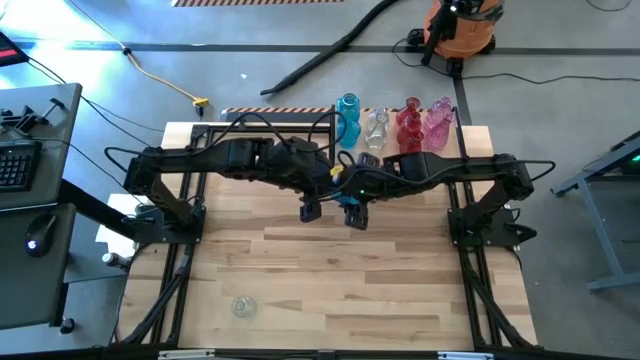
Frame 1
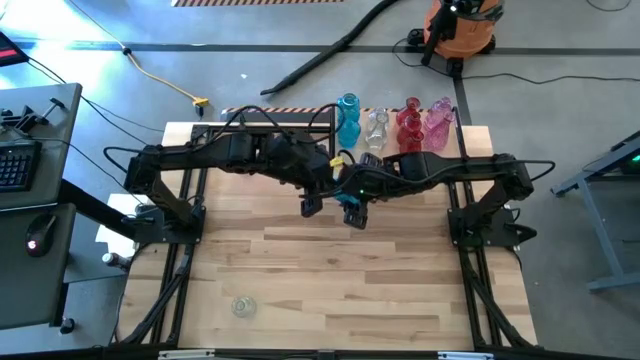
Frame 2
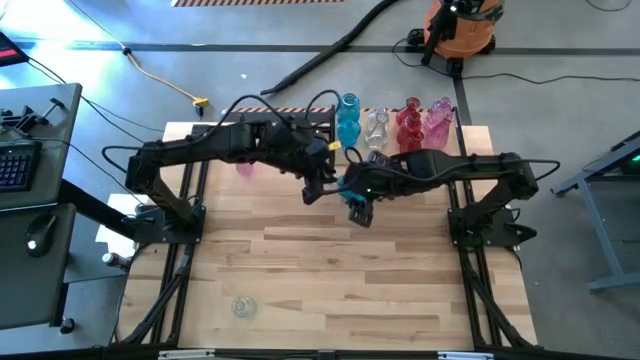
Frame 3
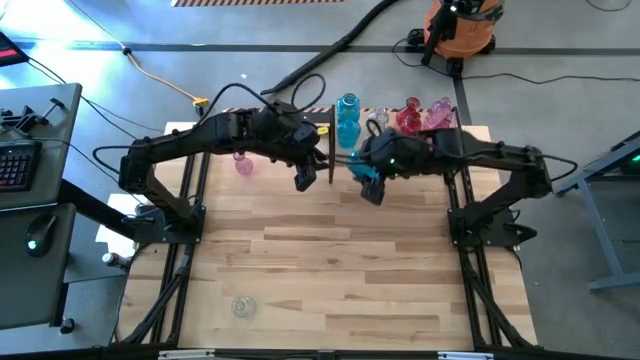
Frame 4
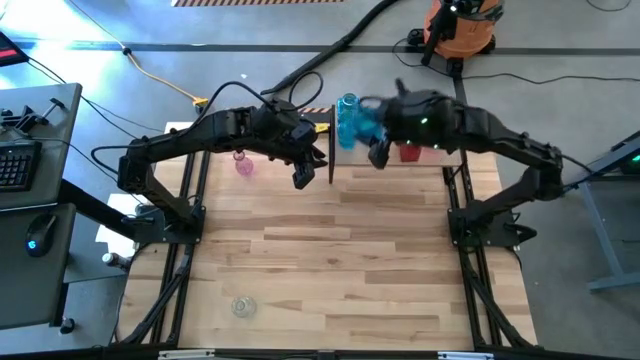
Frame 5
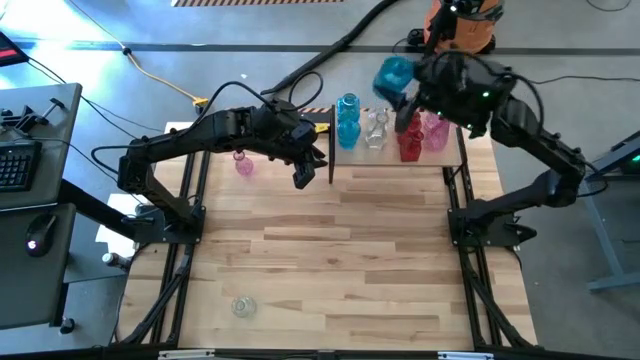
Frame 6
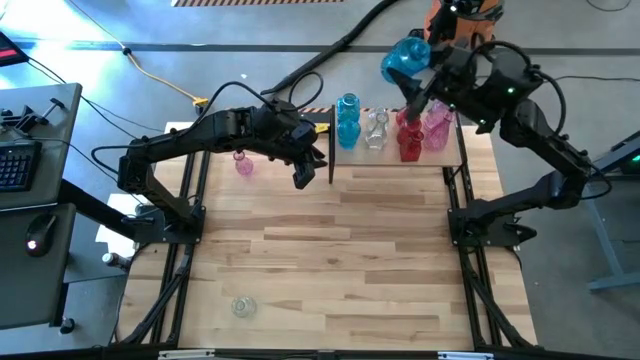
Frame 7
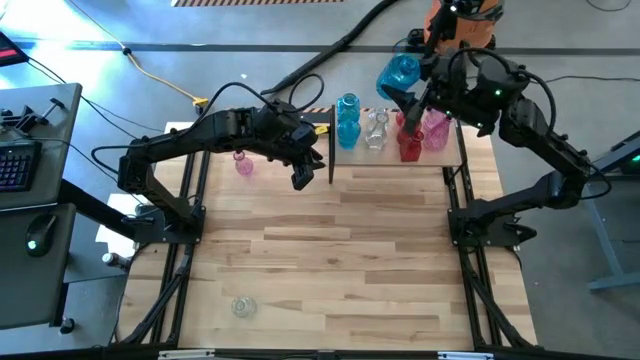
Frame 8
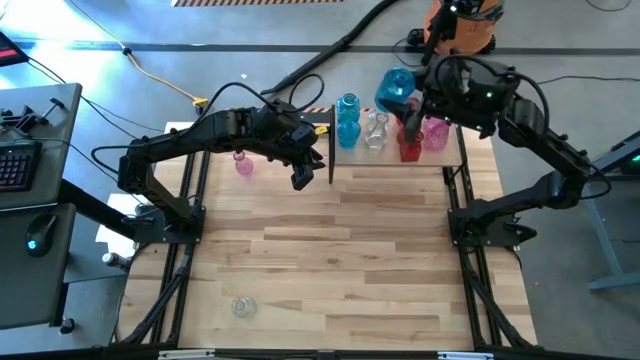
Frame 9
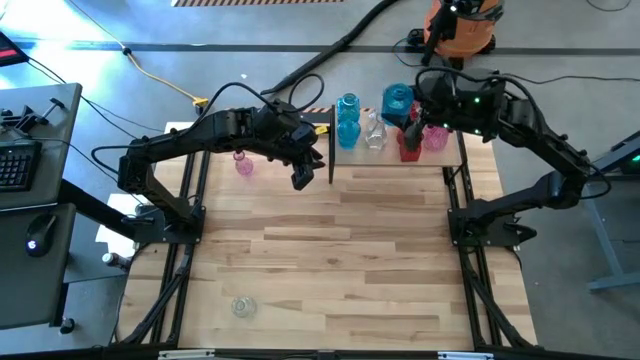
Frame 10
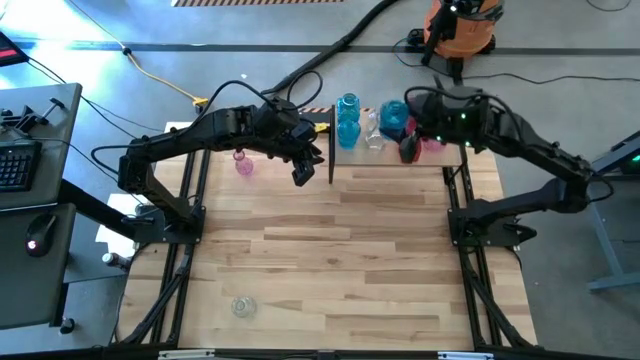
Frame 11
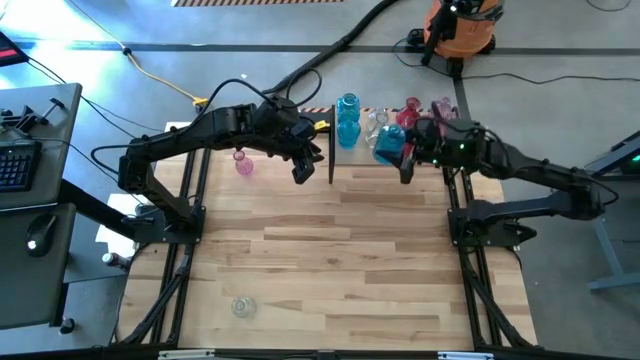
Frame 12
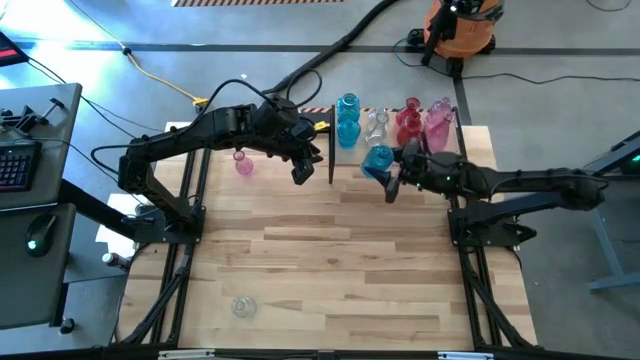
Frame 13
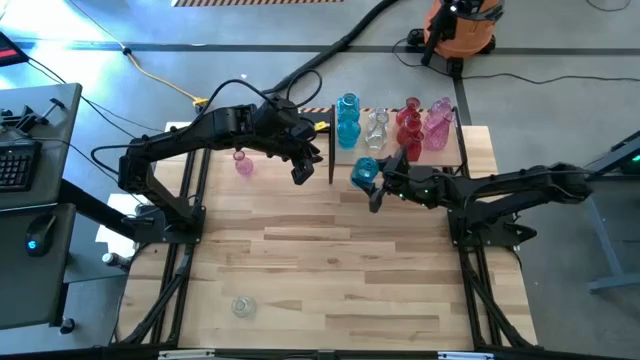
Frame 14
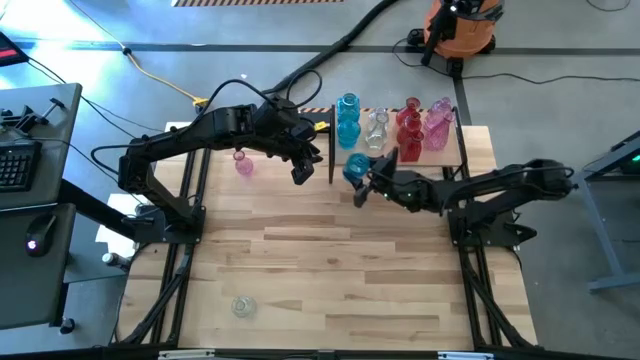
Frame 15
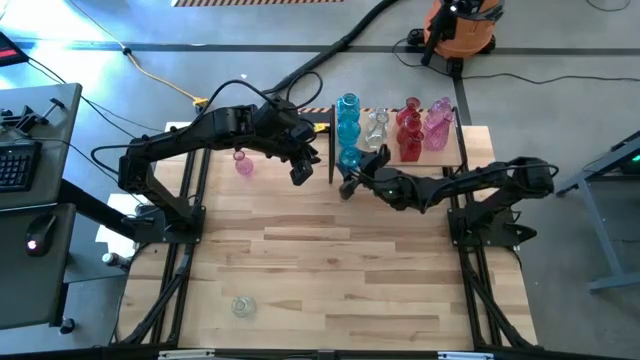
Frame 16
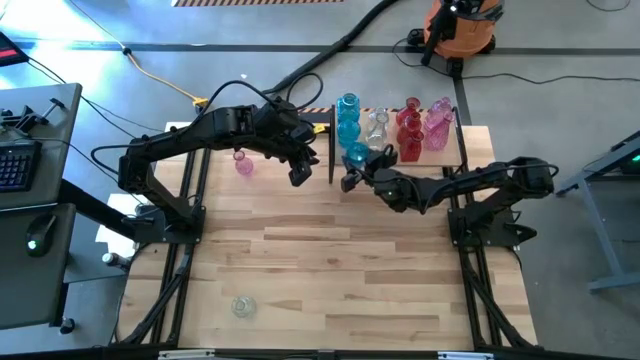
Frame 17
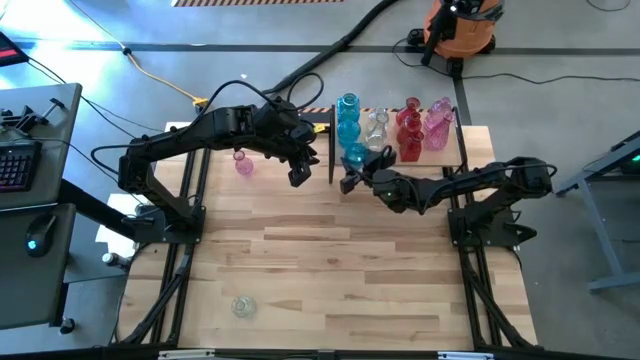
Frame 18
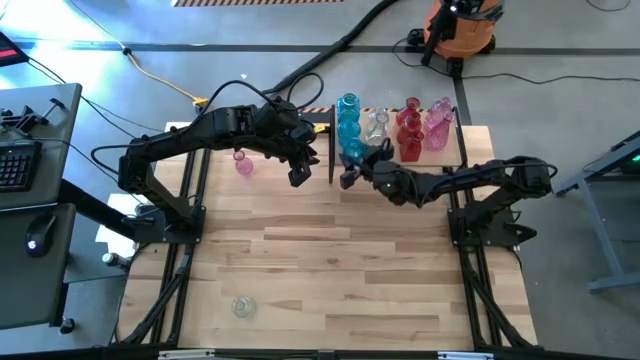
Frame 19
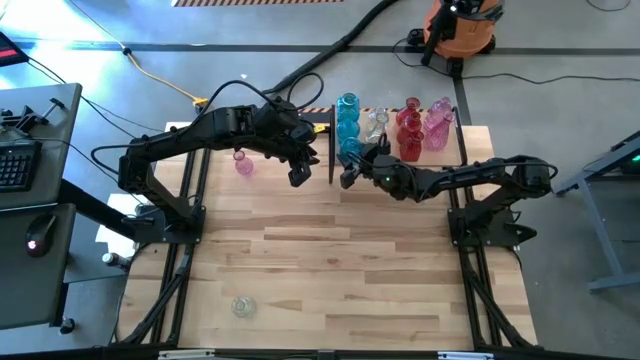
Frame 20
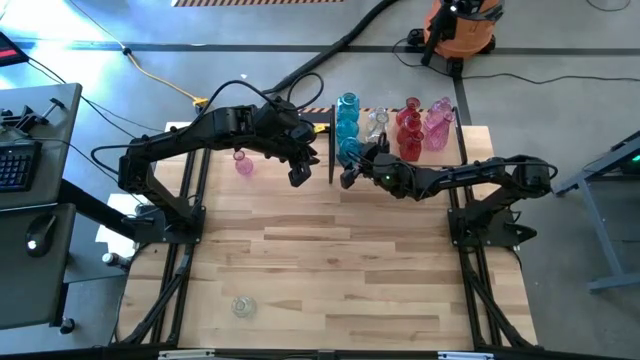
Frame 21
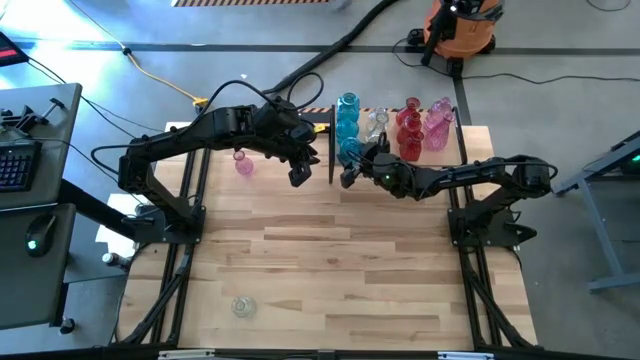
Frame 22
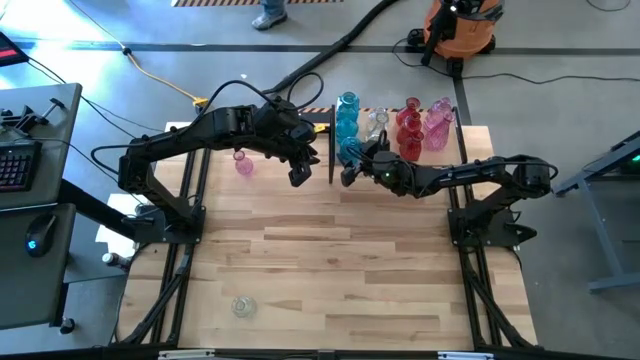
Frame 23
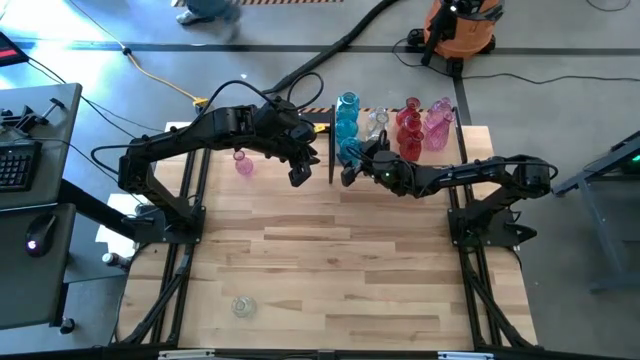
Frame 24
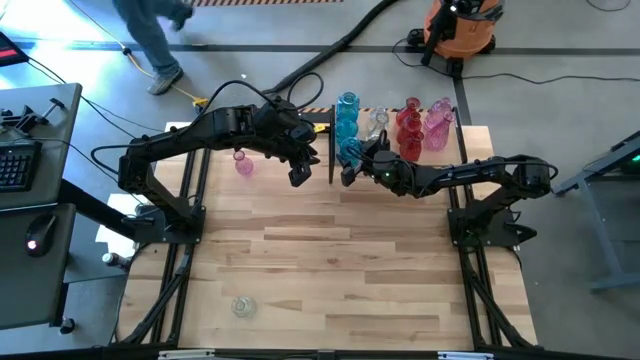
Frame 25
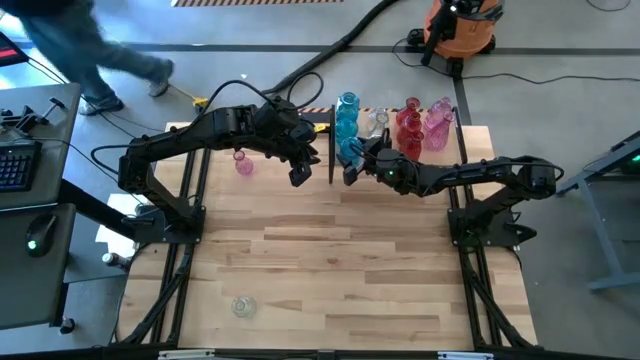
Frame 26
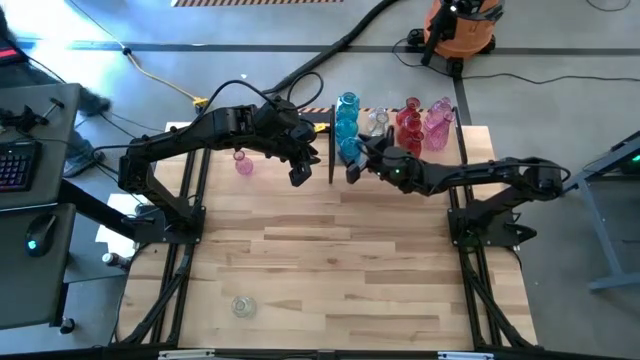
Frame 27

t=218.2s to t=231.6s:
Task: sort vases onto shelf
Put the blue vase on the shelf aligned with the other blue vase

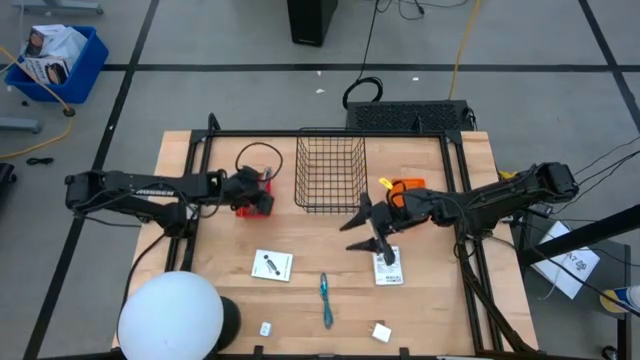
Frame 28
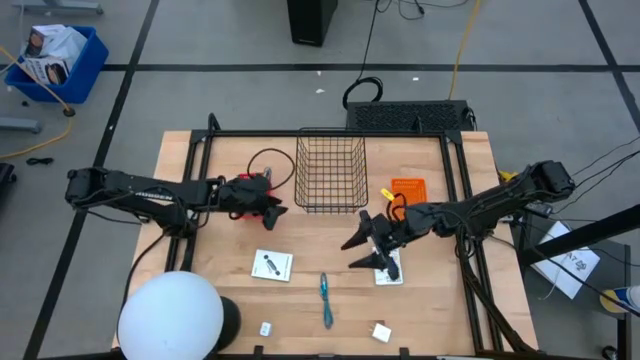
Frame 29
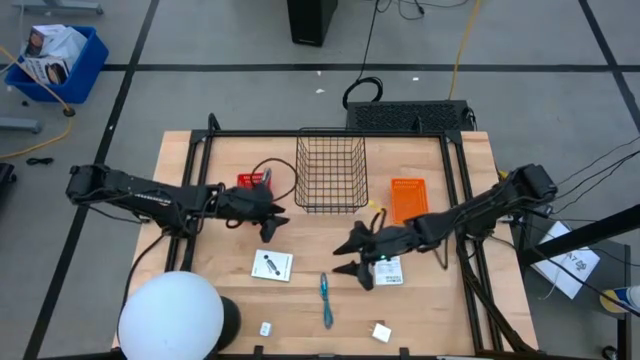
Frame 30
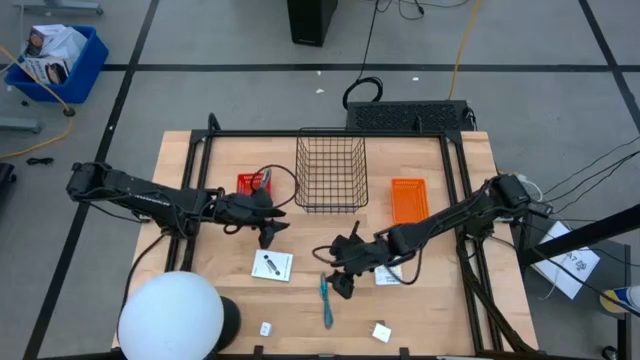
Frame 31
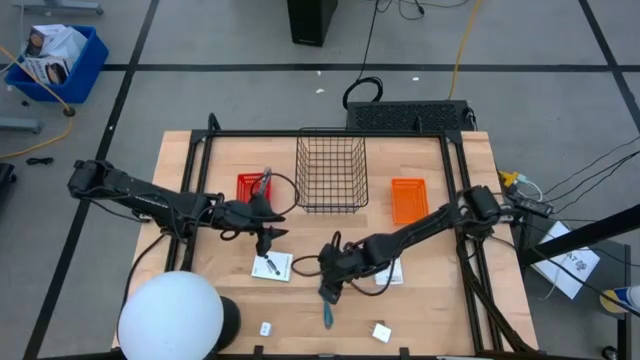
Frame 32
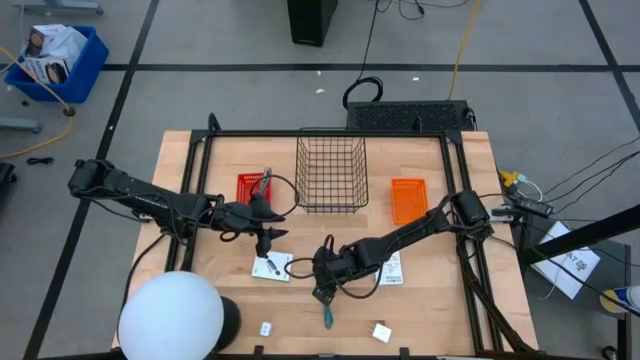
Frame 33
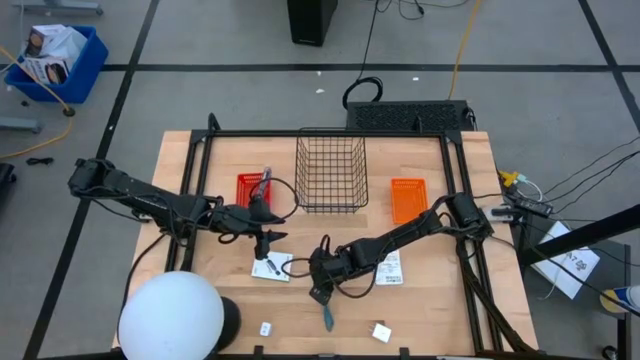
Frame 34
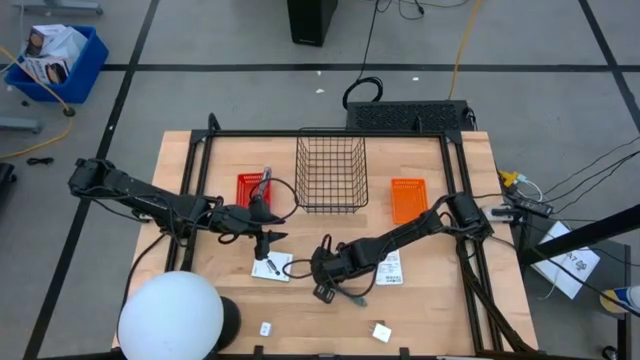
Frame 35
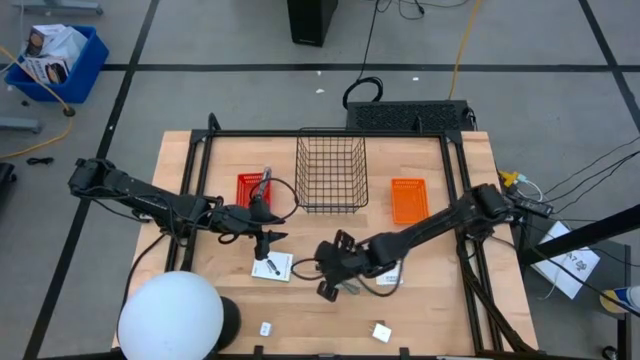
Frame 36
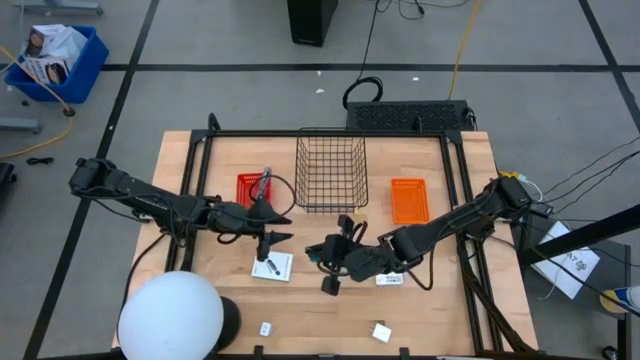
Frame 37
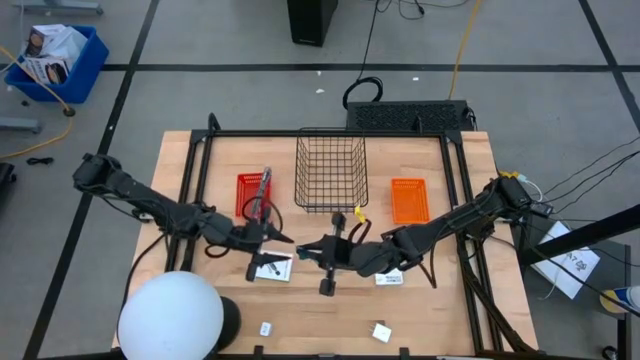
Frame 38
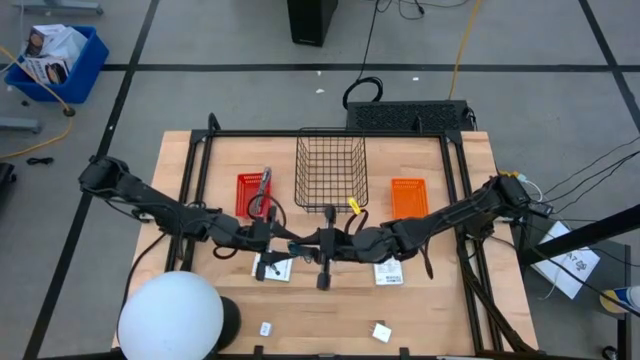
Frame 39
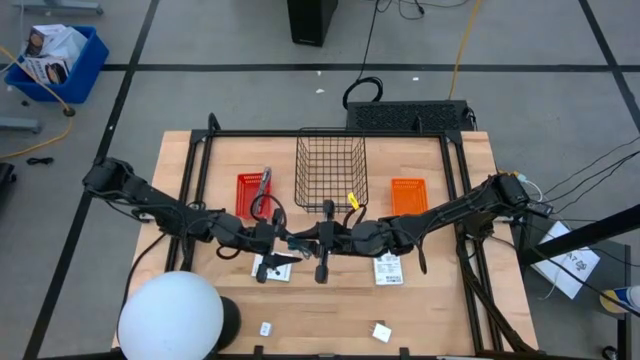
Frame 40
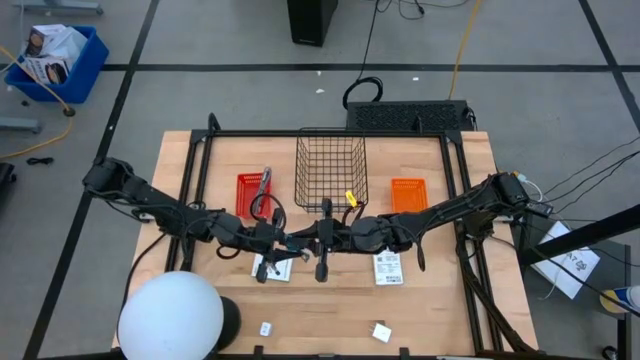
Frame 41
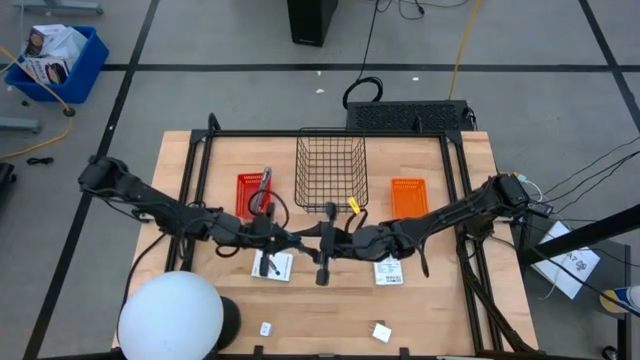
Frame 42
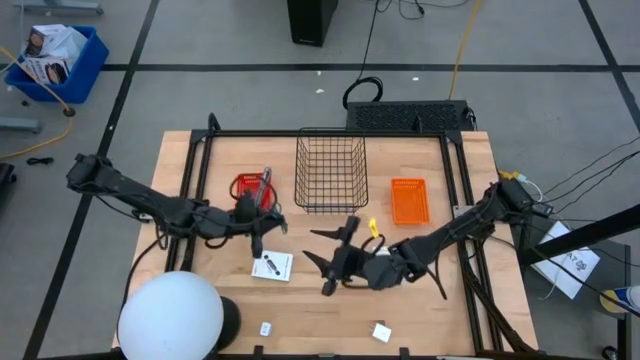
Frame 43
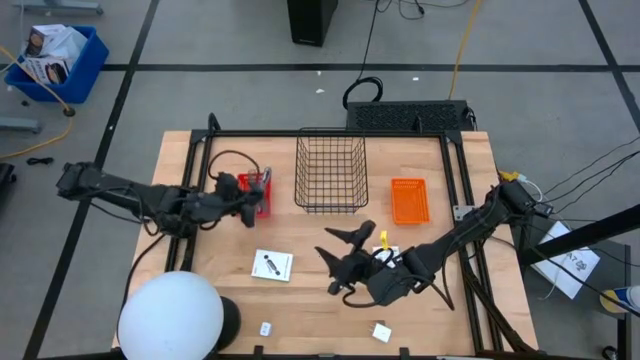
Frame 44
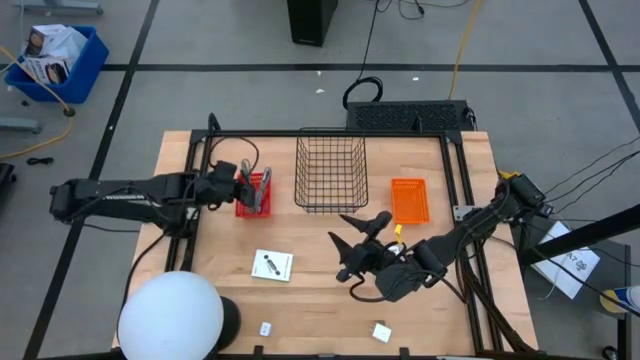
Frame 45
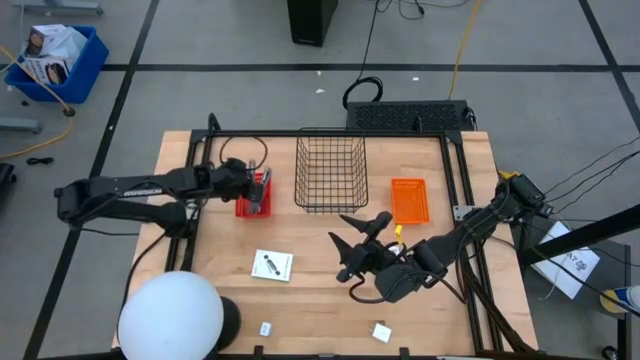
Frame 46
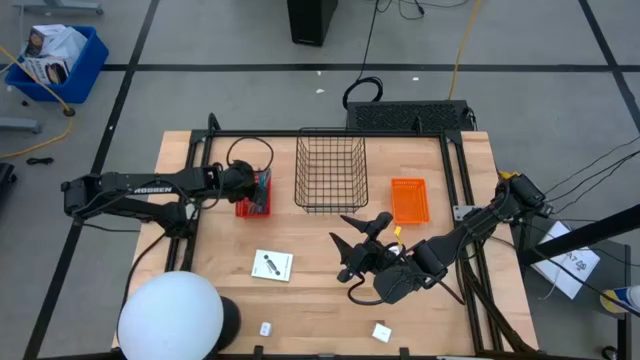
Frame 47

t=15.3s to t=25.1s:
Task: Pick and place items into bin
Put the blue charger cable into the red basket
